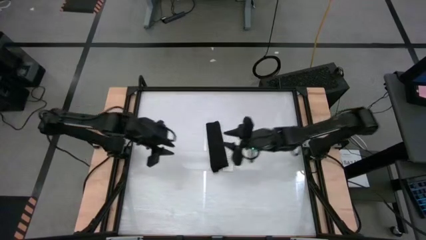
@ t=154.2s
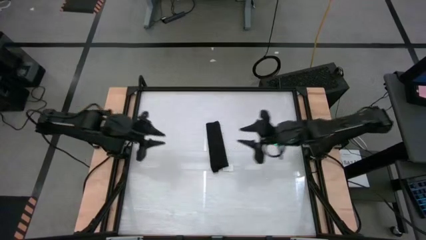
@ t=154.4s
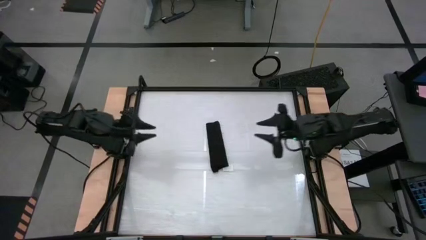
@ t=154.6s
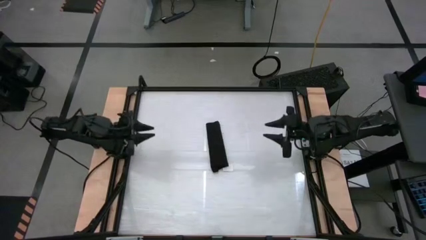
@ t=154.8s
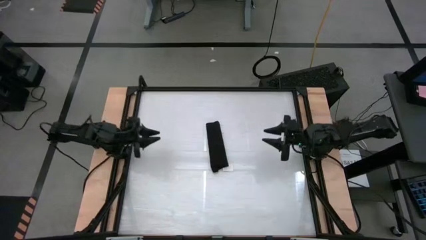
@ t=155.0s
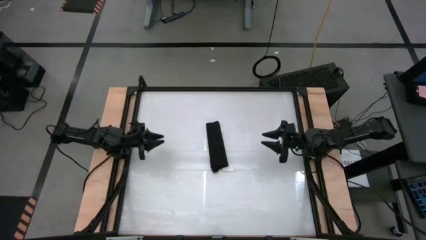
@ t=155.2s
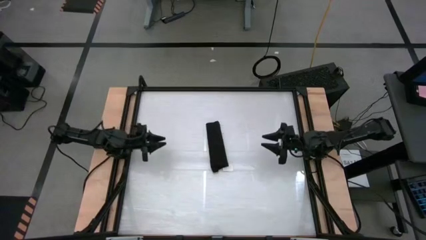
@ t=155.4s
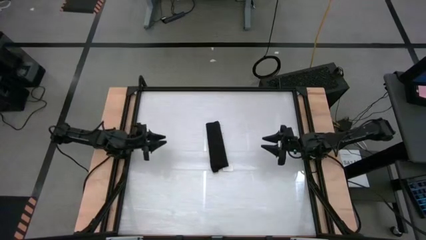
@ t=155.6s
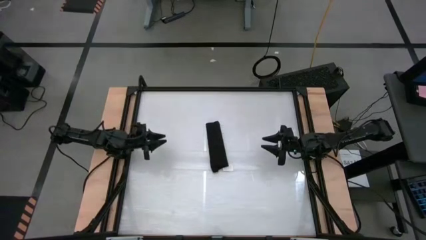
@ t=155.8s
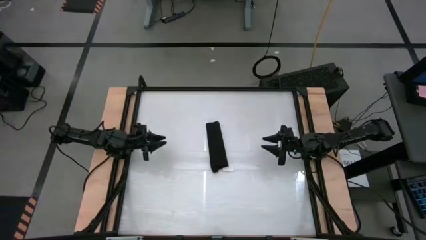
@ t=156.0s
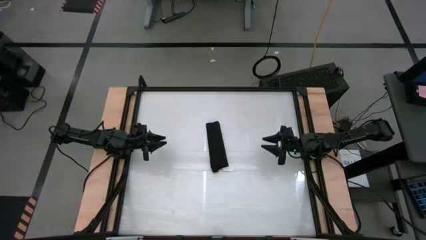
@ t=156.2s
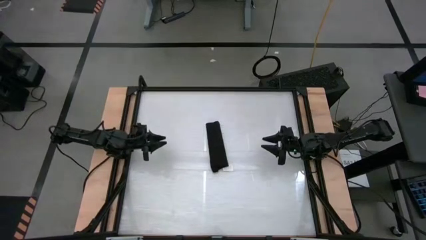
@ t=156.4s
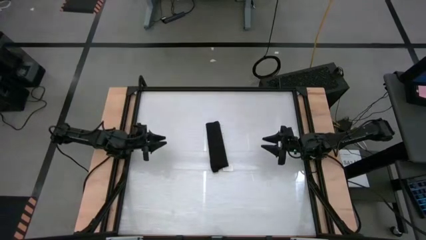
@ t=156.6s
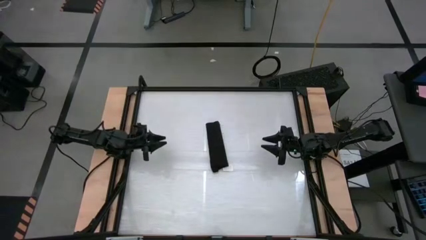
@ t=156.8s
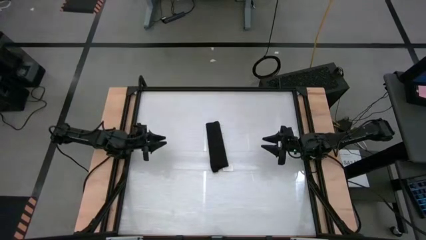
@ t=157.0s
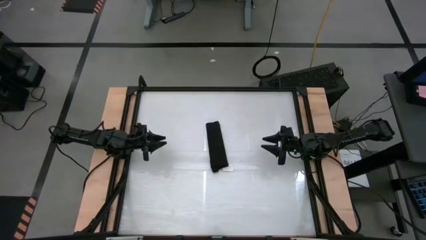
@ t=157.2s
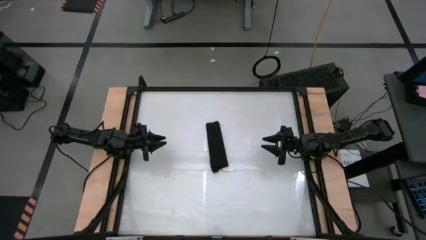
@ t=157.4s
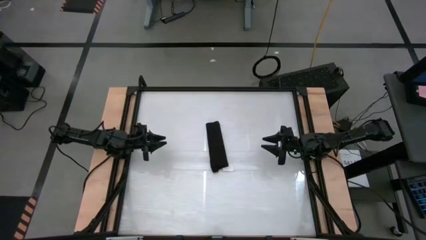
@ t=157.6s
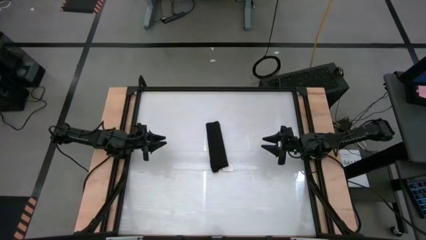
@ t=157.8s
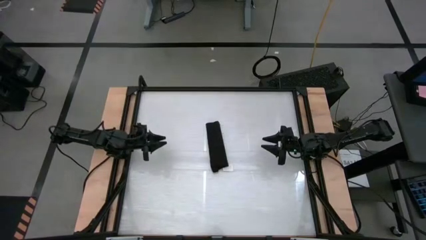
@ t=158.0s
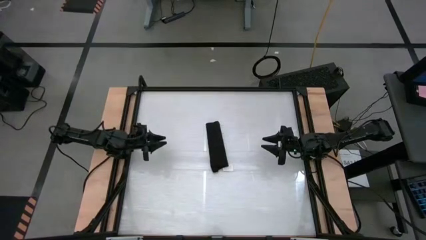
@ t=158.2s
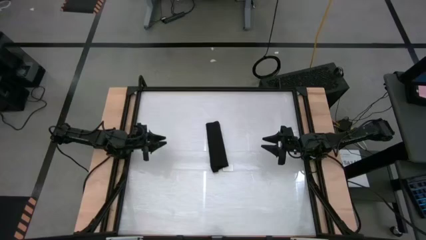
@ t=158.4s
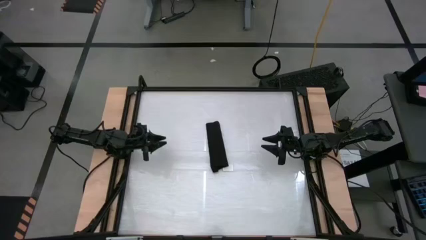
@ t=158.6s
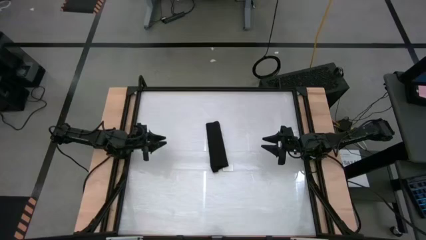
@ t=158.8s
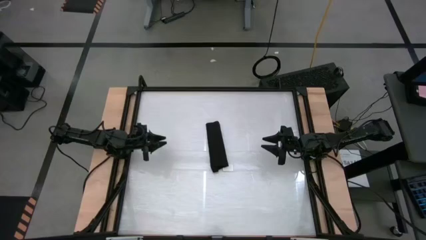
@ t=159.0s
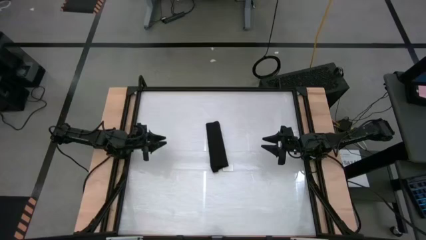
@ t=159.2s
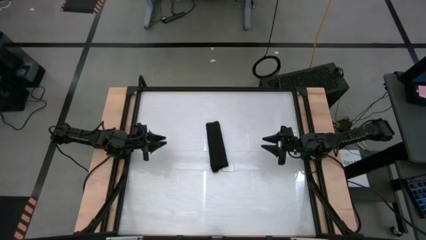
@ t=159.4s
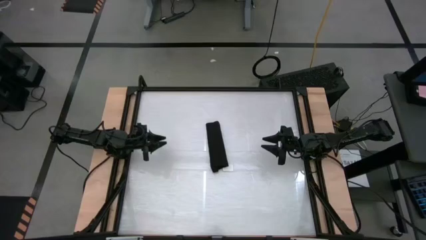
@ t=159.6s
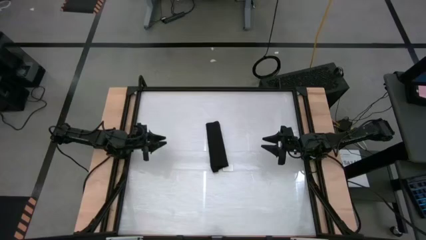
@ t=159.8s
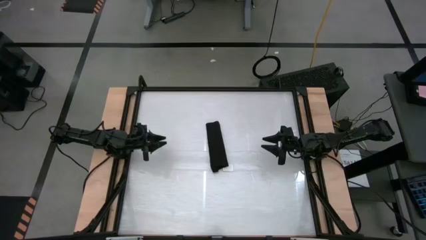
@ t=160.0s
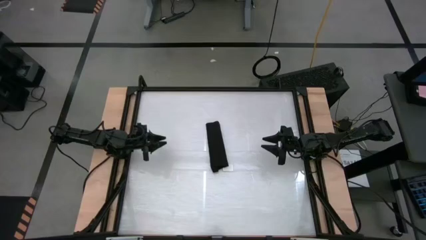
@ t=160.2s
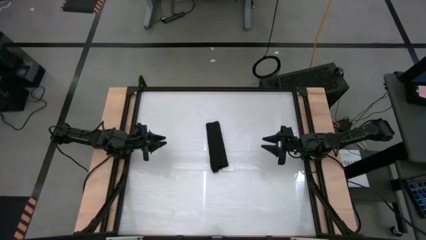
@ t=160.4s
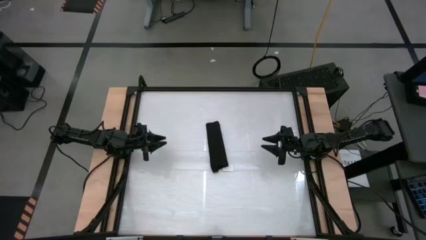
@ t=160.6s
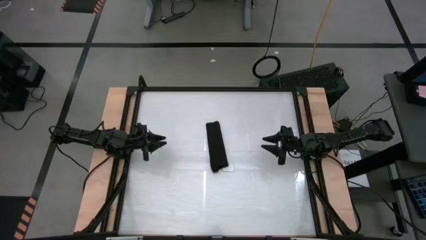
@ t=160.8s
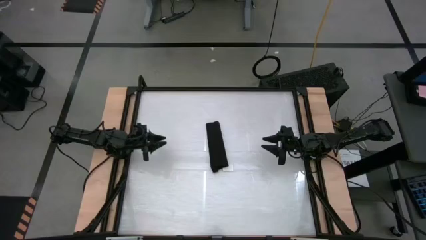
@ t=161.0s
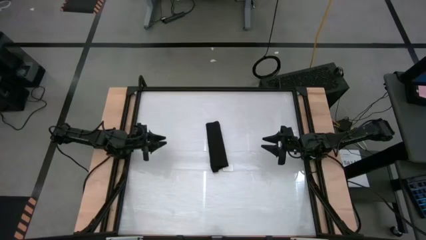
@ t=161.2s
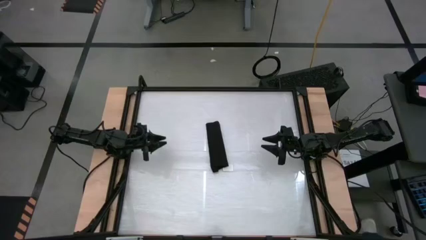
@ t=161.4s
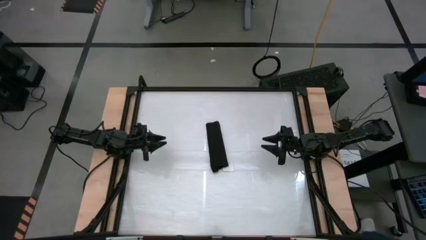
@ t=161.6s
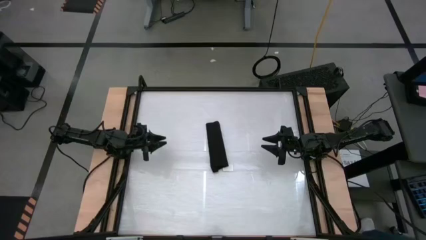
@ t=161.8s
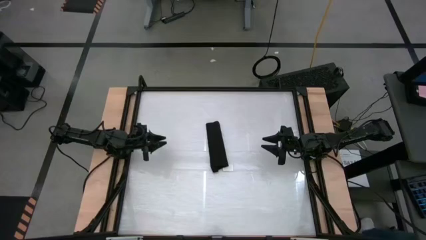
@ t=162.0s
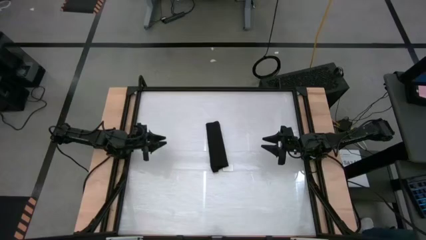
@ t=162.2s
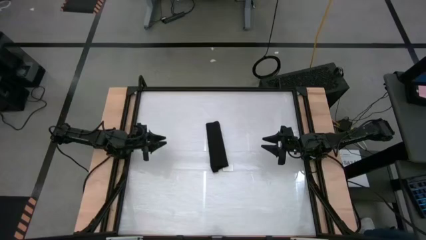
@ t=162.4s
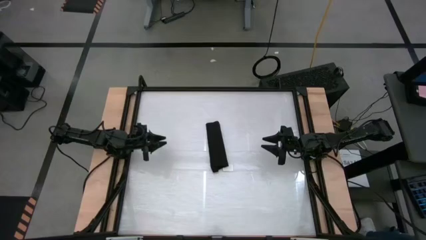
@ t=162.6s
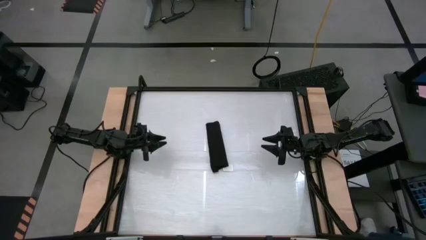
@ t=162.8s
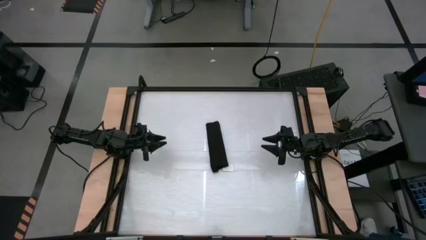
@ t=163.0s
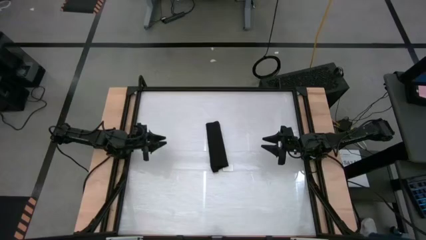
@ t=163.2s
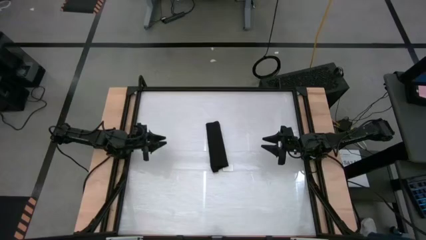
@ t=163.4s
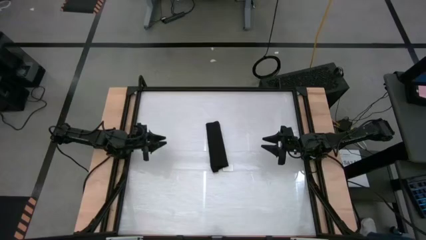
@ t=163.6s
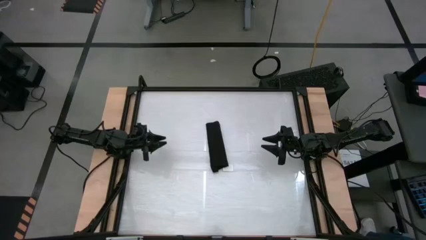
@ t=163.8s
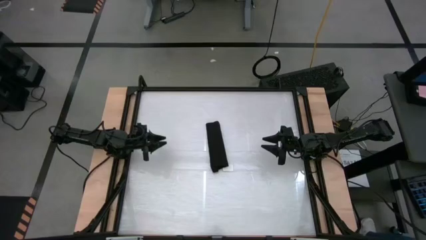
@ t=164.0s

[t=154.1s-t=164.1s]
Task: Roll napkin
Return to Home Position

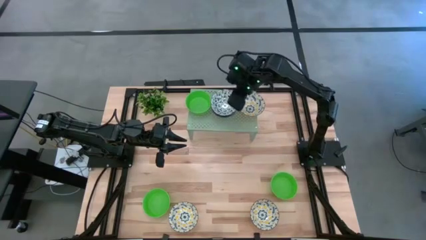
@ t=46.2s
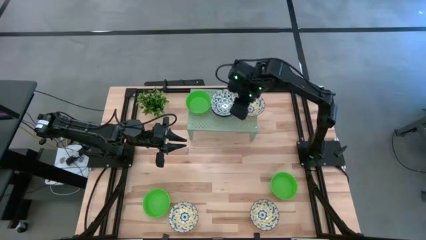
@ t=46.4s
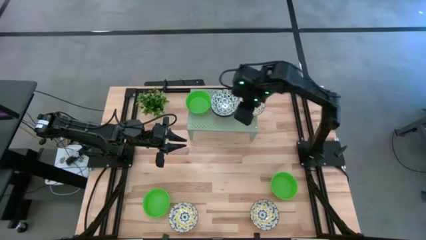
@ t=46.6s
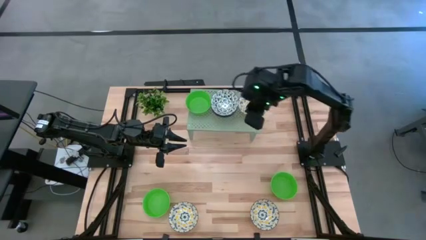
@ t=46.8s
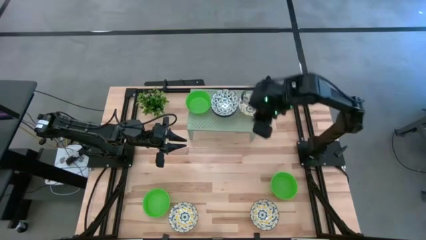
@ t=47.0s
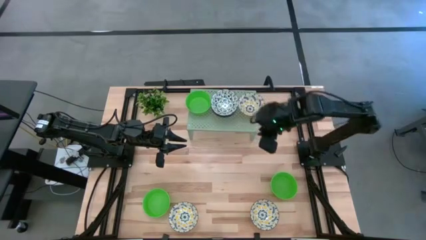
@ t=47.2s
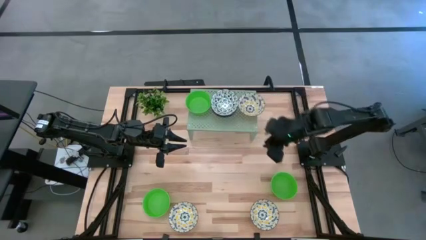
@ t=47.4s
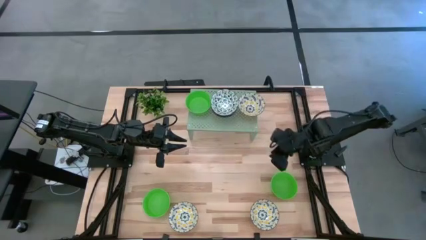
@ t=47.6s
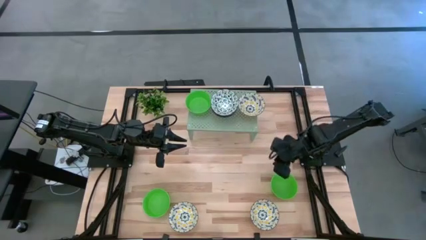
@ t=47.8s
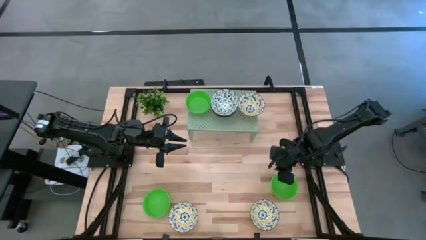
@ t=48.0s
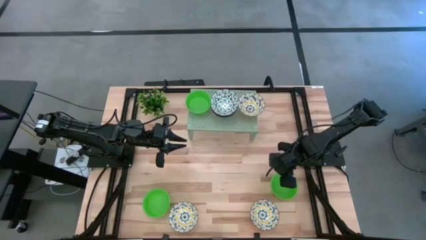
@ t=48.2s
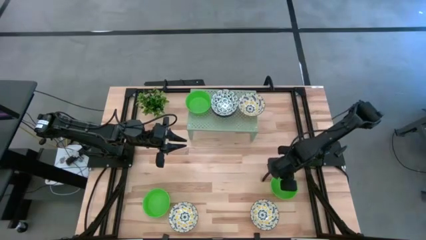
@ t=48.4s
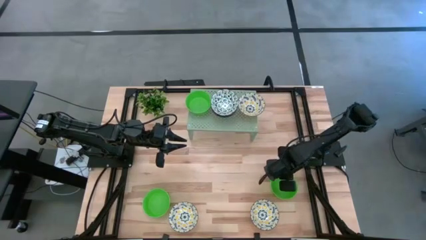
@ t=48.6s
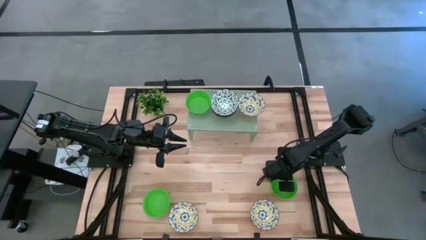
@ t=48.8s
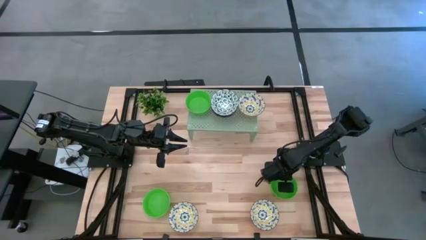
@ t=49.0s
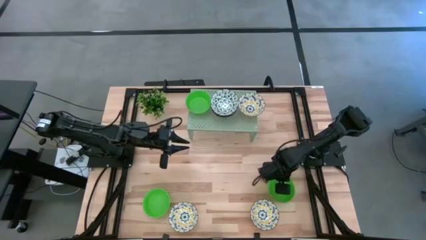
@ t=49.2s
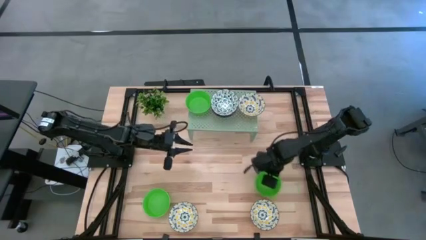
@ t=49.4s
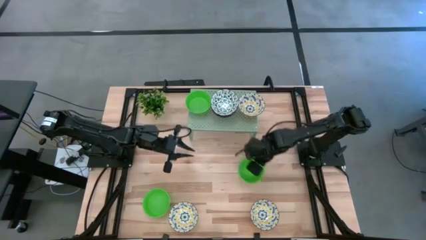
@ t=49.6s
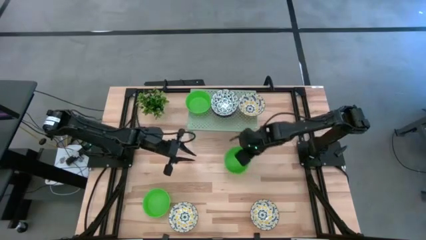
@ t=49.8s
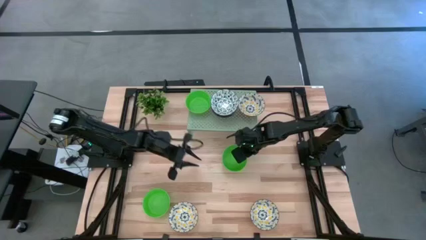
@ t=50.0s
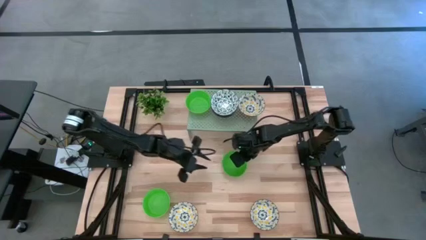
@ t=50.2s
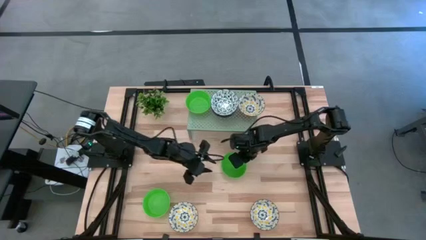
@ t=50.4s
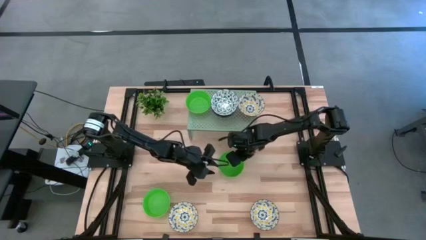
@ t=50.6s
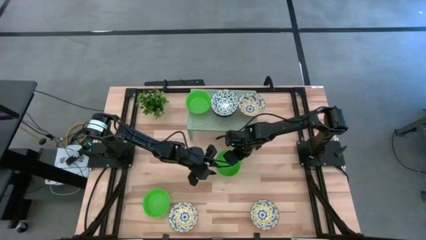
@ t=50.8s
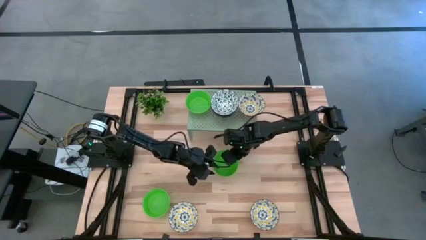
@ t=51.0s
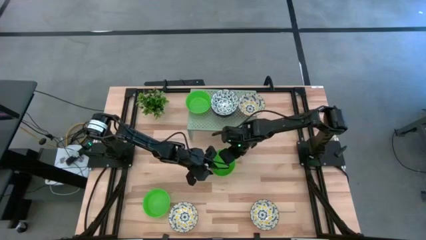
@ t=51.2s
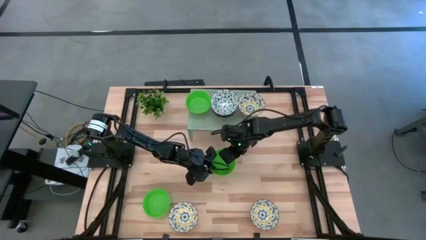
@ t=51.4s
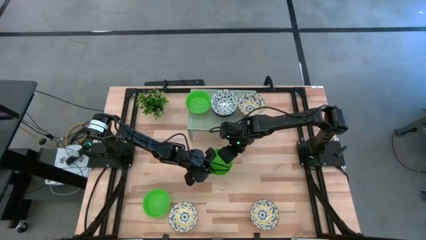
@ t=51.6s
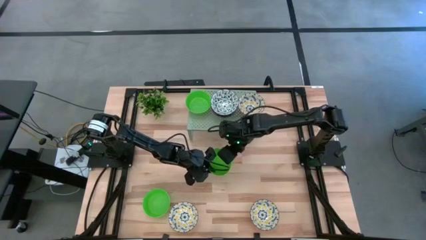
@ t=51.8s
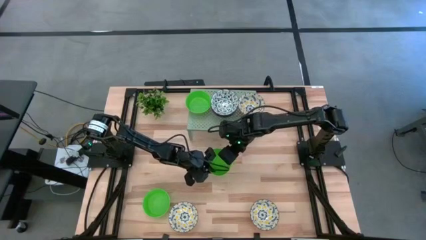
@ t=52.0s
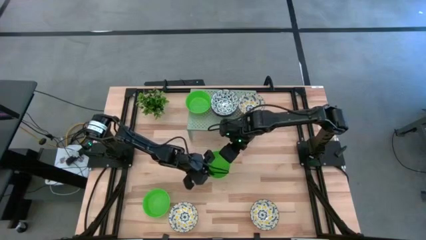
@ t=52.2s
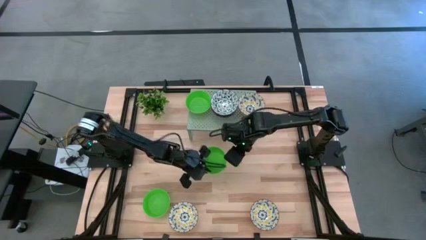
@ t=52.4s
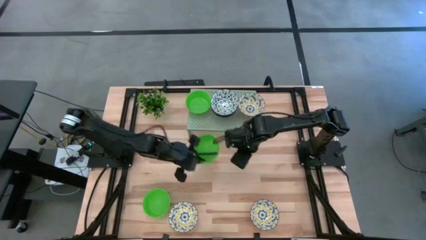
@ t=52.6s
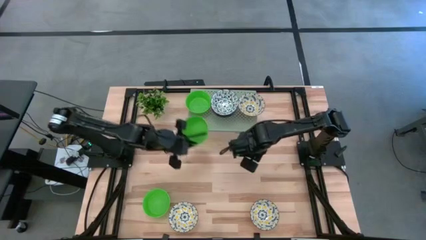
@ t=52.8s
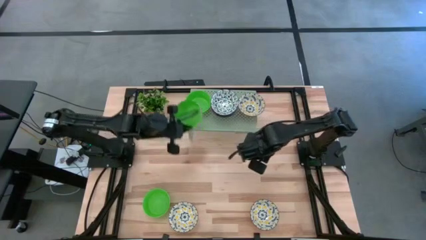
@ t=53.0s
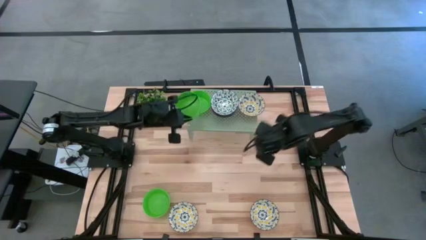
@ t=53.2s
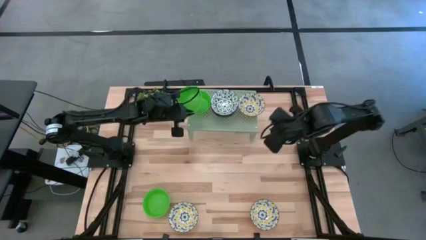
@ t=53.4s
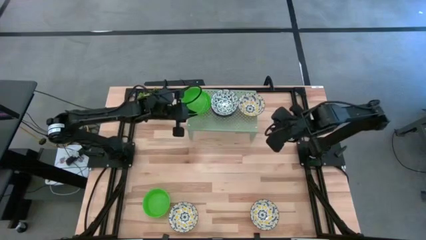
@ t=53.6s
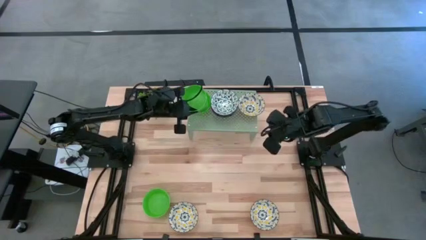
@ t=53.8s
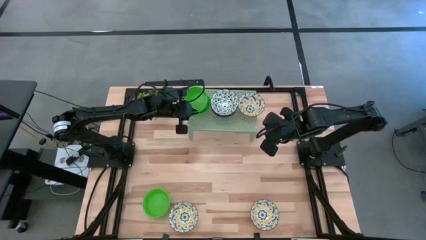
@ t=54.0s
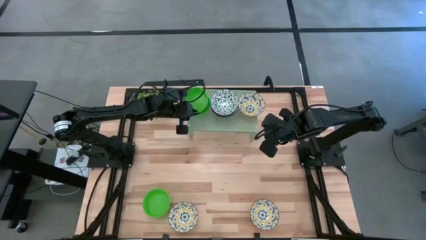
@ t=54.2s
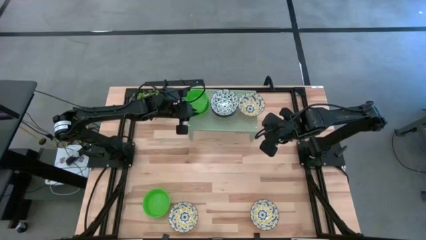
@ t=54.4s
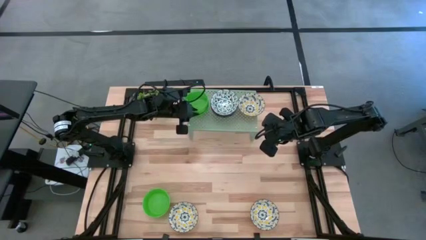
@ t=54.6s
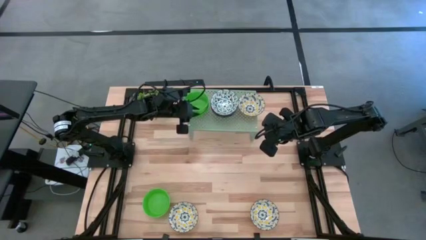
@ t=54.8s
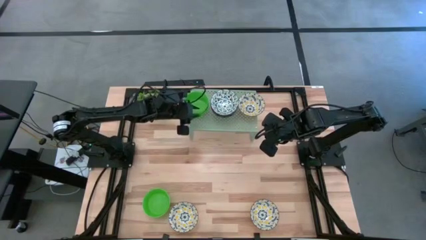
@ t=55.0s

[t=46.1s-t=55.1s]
Task: Pick & Place Mini bowls
Stack the right green bowl on top of the green bowl on the shelf
